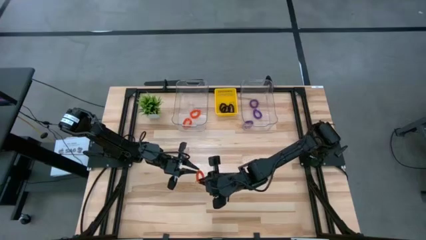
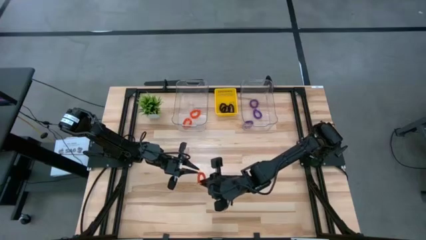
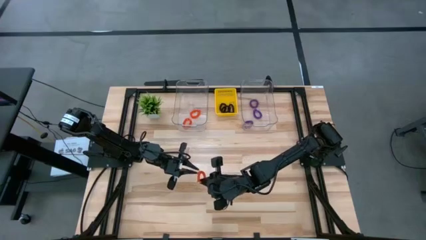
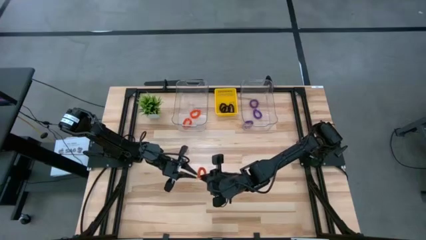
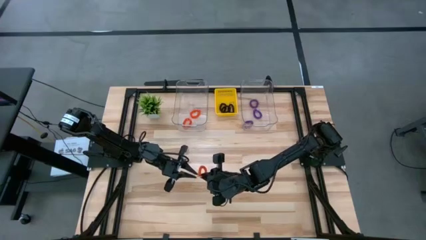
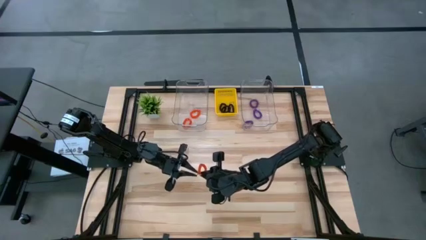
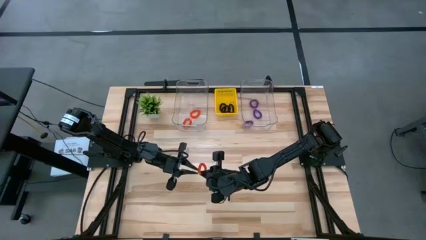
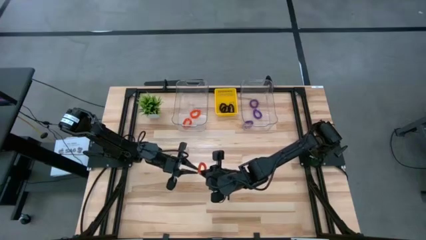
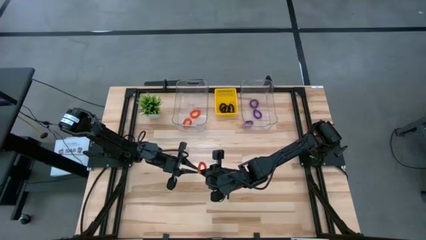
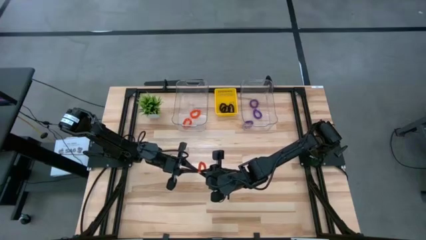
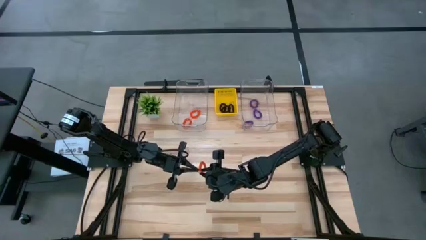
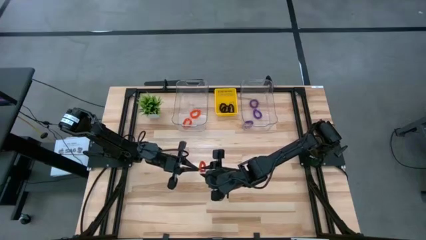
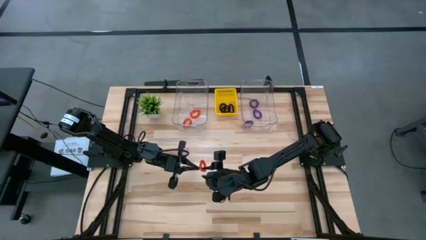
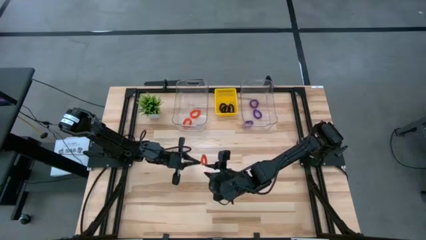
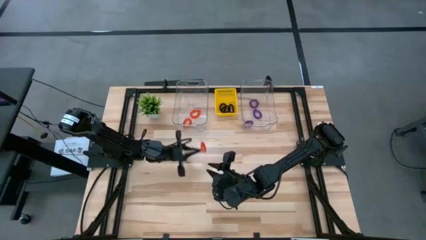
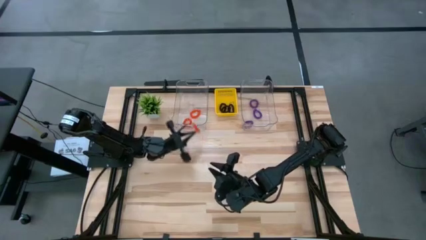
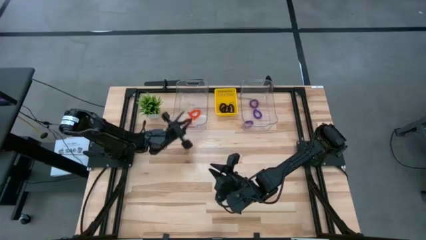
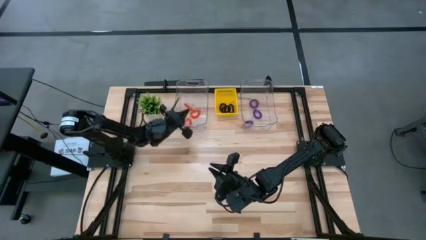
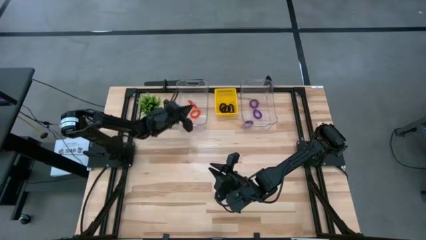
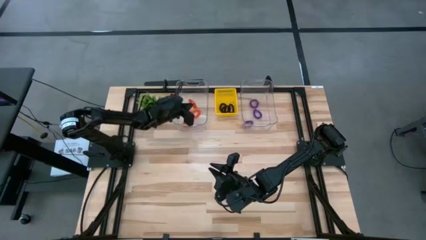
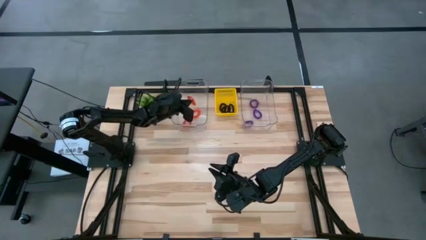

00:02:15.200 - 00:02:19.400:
Task: Sort spring keychains
Put the orange spring keychain into the left transparent bin

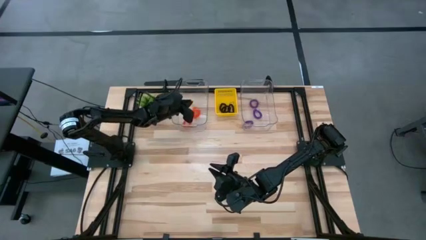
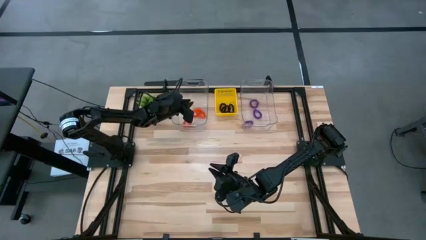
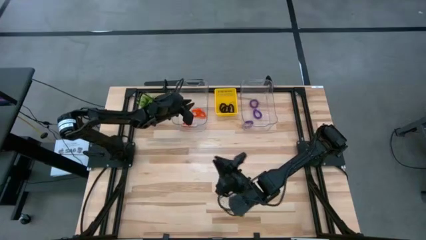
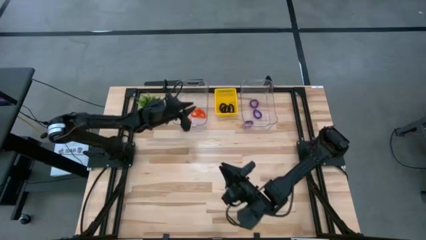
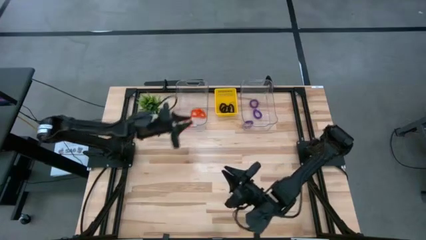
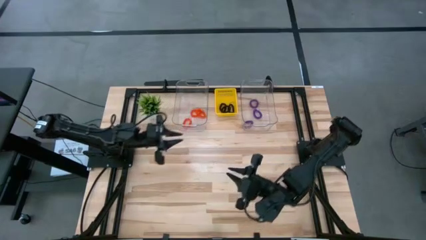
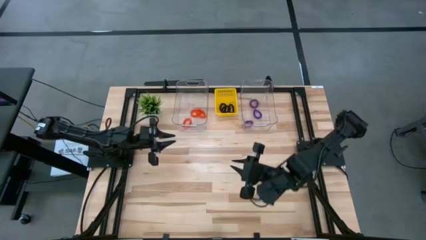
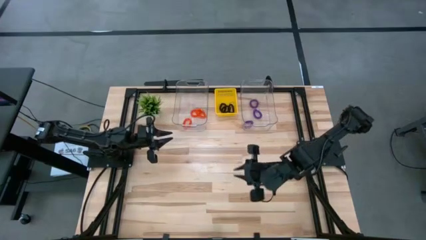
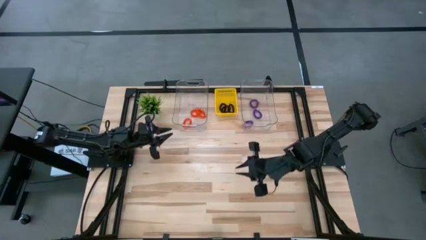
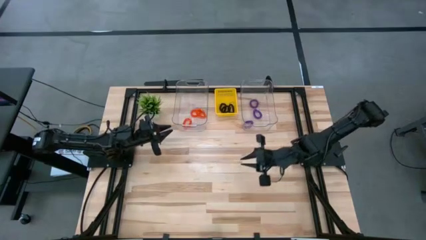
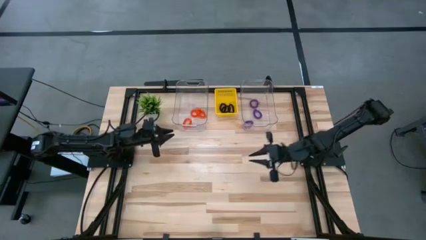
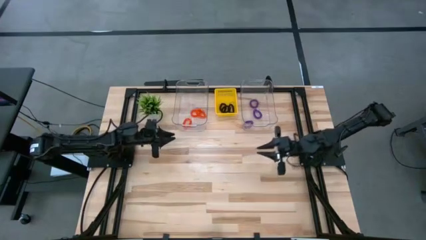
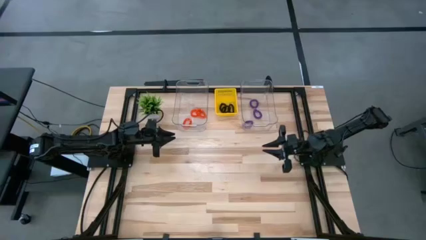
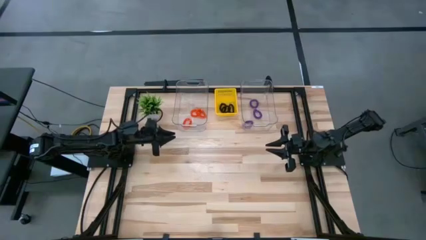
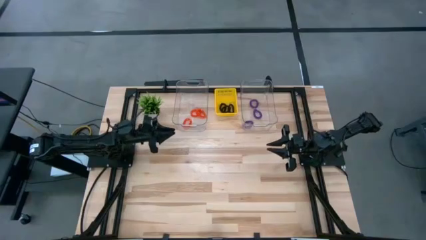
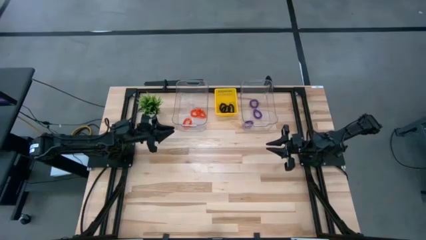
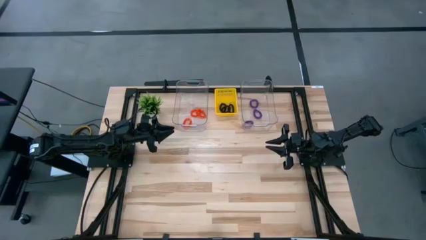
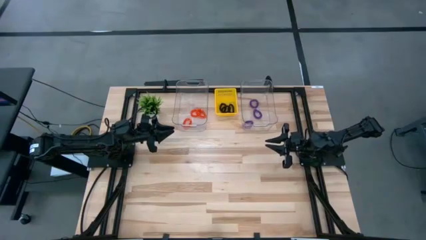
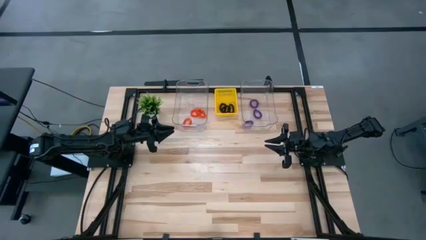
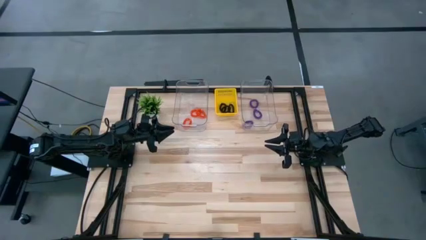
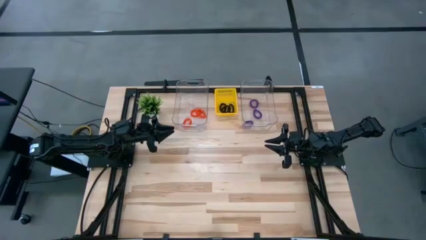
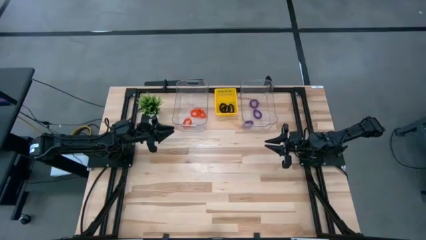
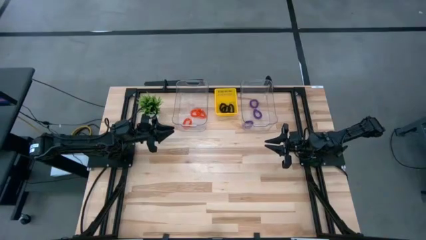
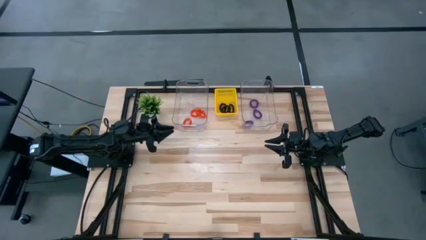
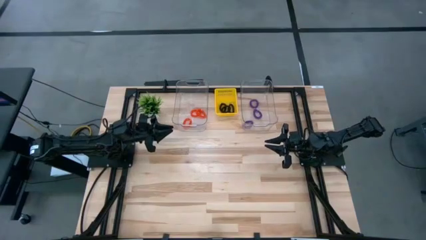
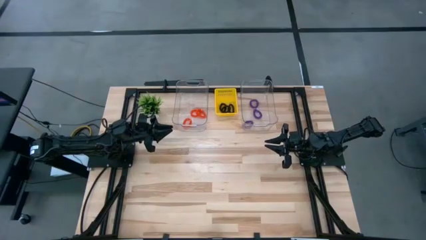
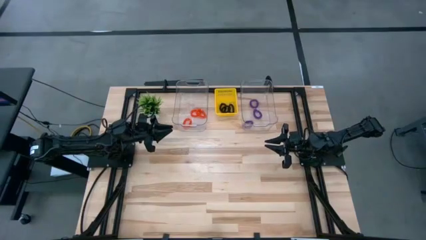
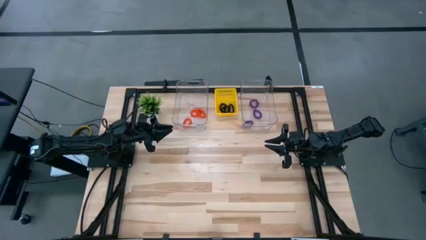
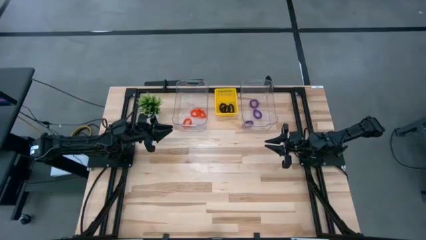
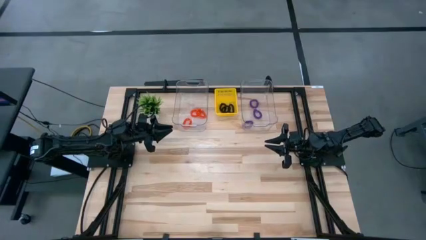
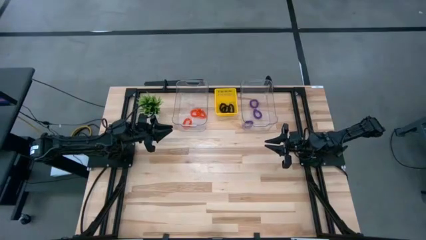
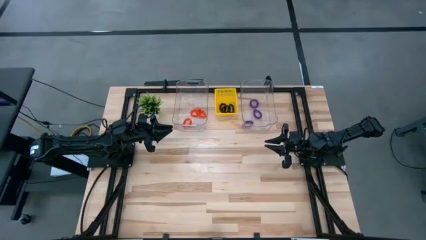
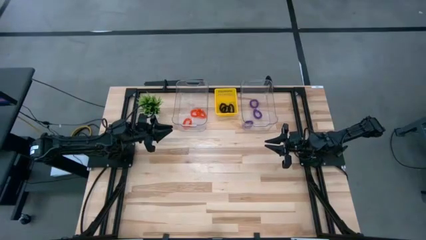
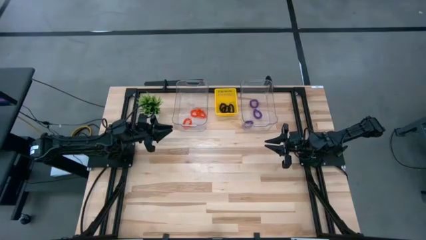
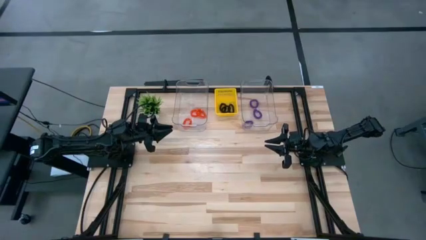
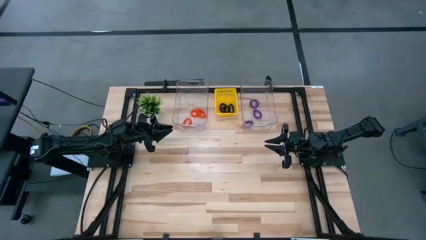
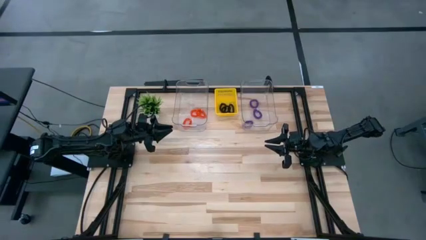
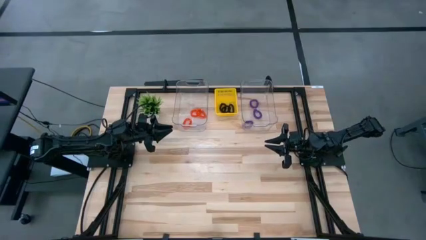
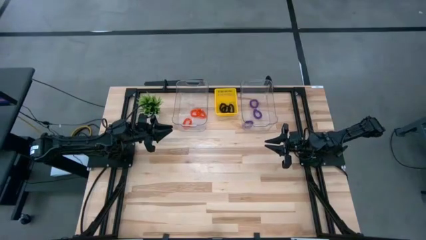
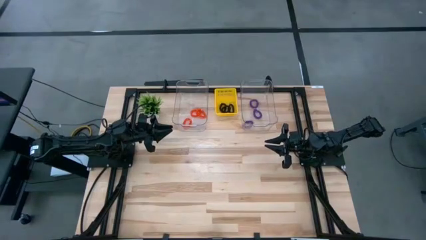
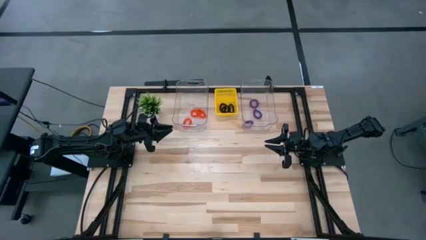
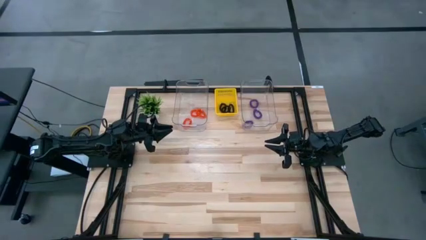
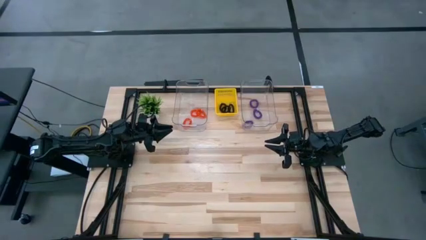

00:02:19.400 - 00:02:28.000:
Return to Home Position

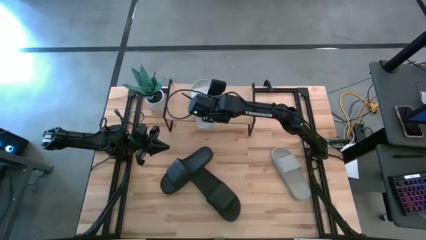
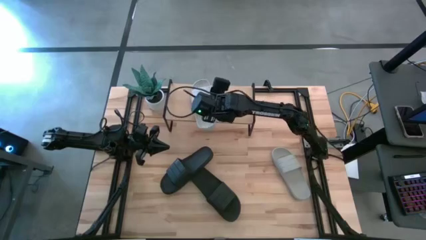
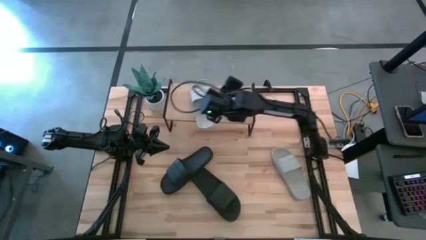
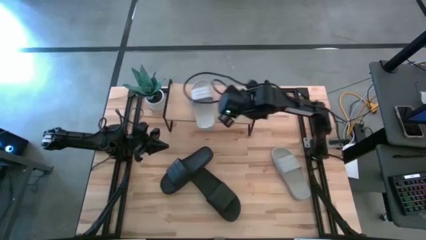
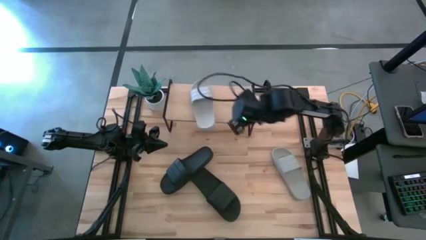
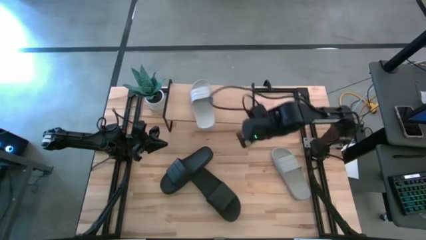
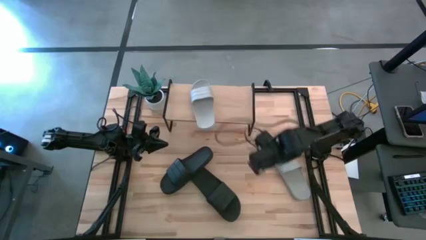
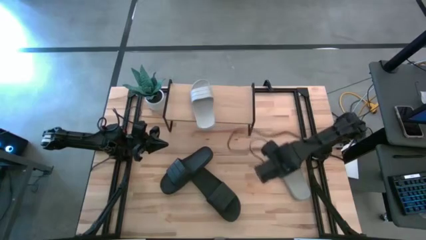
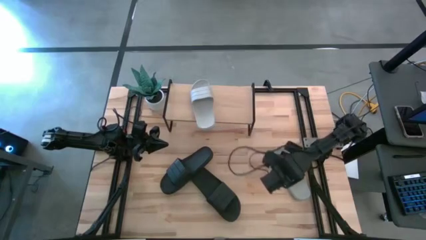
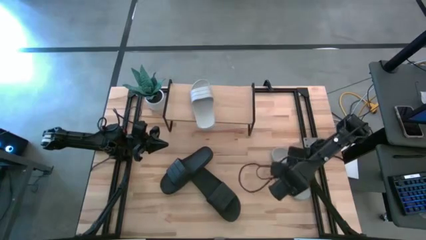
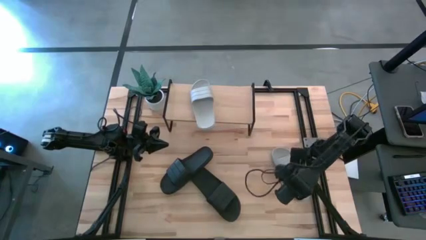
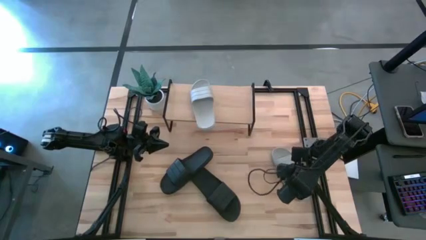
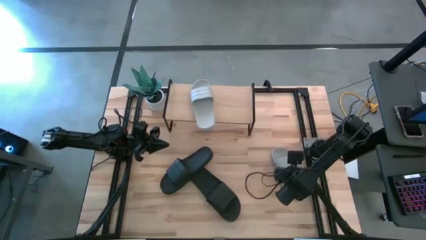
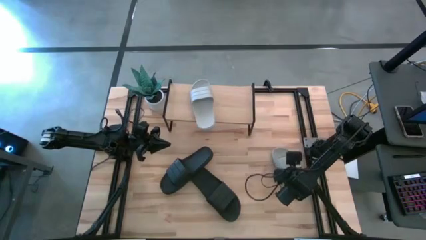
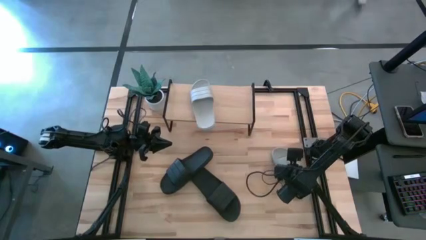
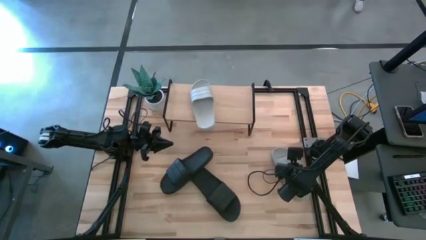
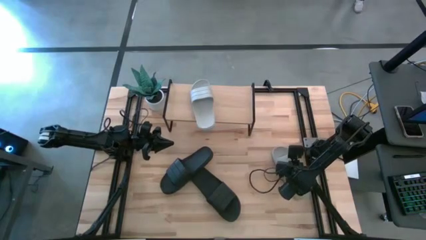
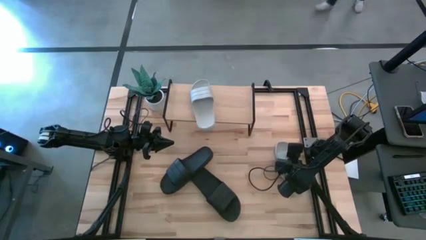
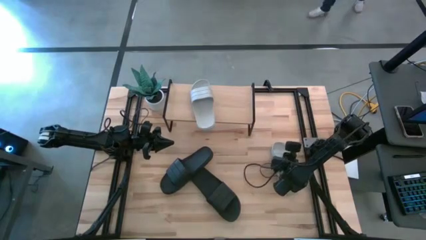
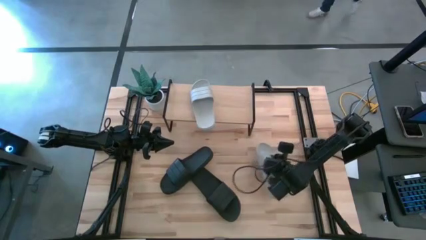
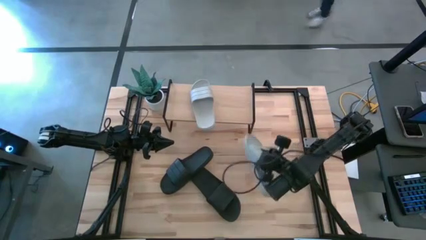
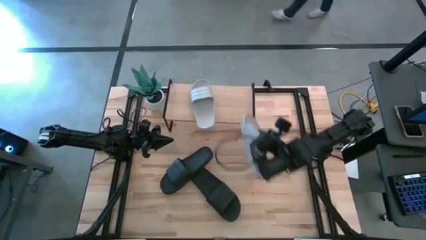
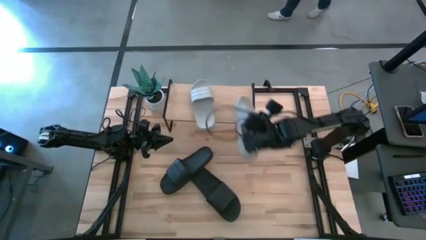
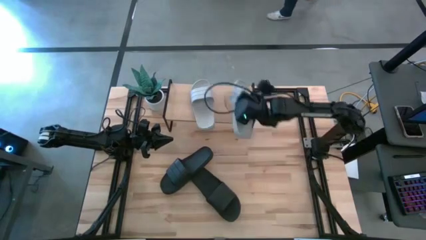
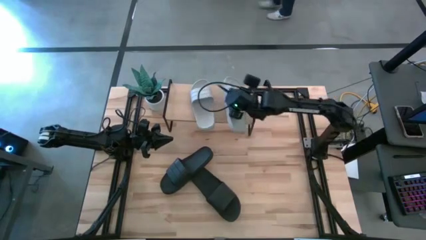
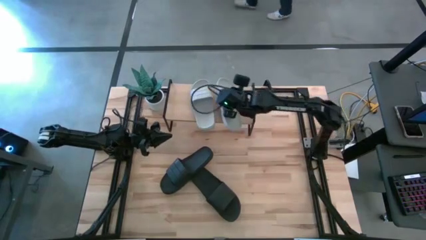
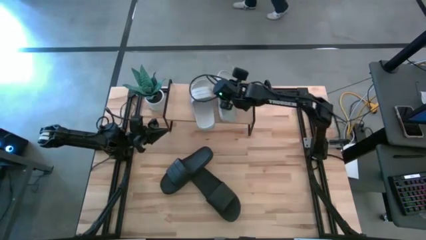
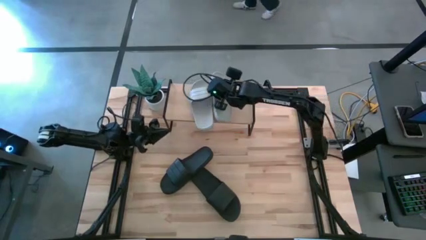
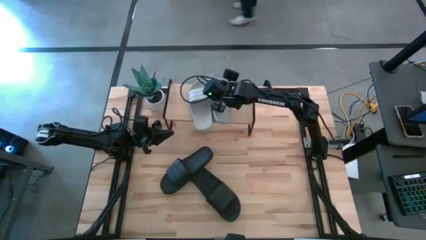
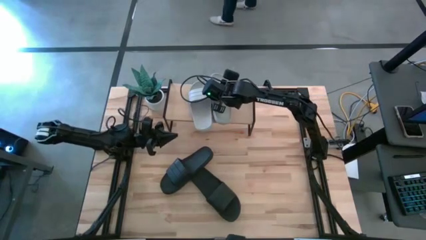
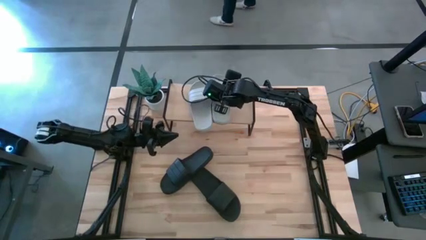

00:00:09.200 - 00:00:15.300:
Task: Pick and place slides into the shelf
Put the gray slide on the shelf
